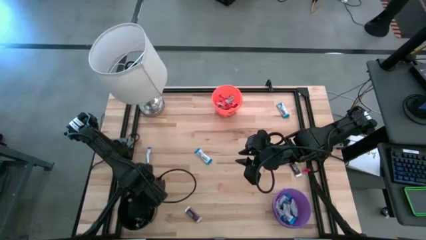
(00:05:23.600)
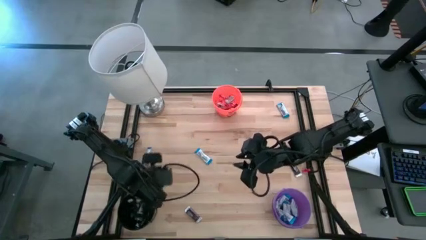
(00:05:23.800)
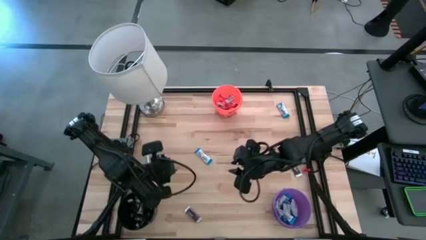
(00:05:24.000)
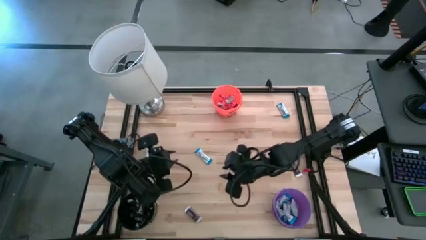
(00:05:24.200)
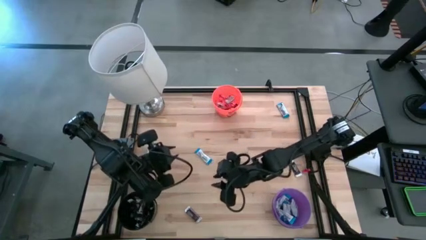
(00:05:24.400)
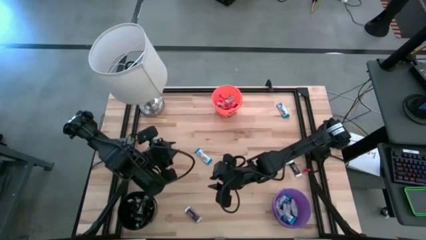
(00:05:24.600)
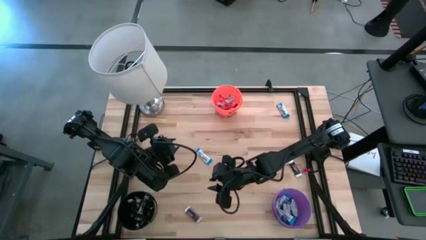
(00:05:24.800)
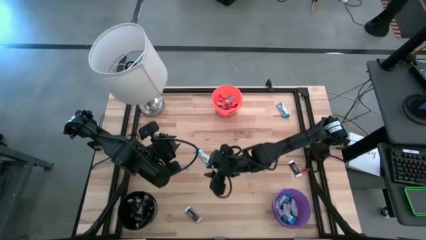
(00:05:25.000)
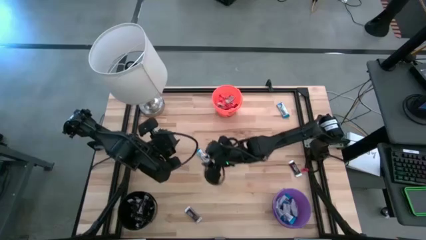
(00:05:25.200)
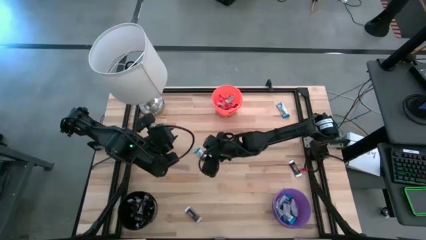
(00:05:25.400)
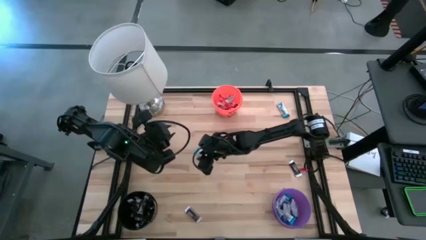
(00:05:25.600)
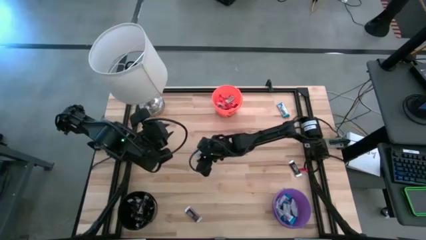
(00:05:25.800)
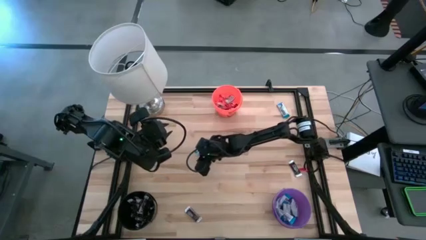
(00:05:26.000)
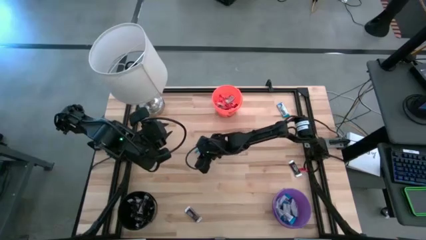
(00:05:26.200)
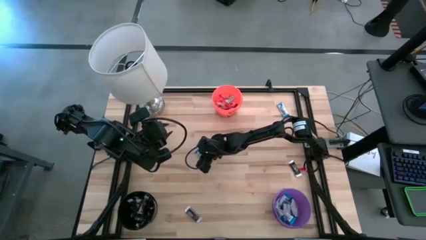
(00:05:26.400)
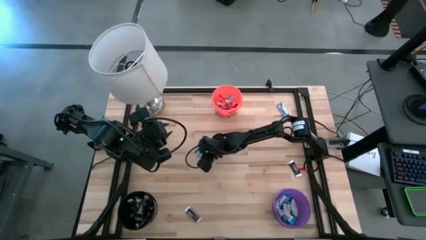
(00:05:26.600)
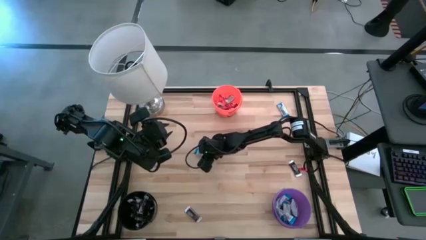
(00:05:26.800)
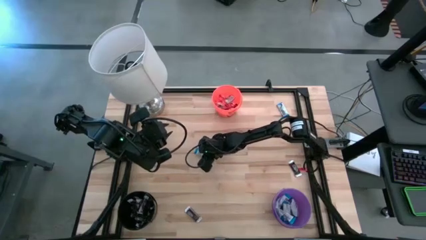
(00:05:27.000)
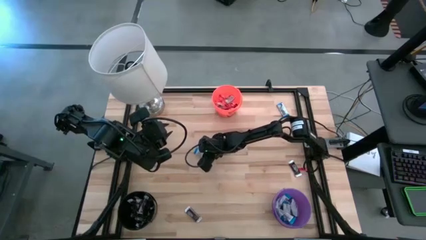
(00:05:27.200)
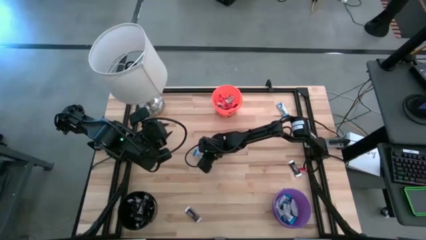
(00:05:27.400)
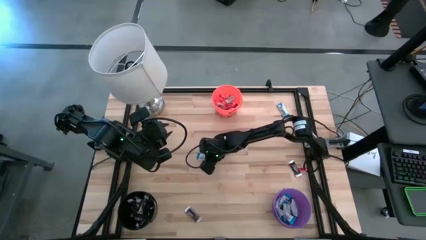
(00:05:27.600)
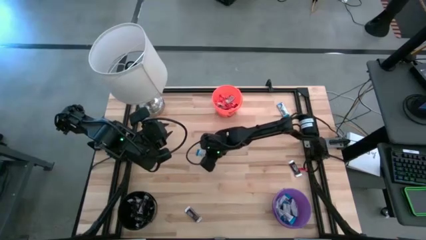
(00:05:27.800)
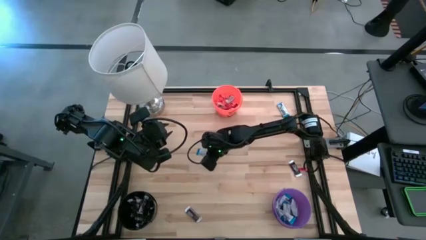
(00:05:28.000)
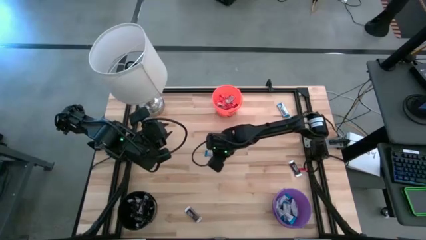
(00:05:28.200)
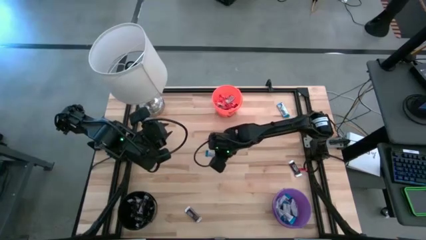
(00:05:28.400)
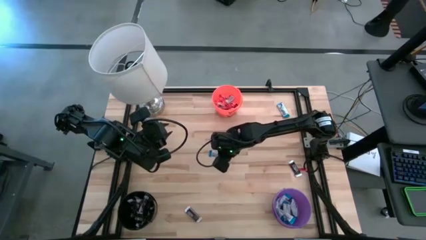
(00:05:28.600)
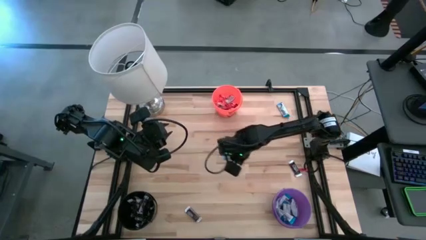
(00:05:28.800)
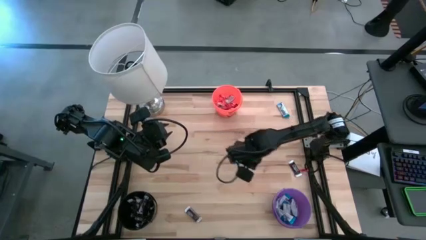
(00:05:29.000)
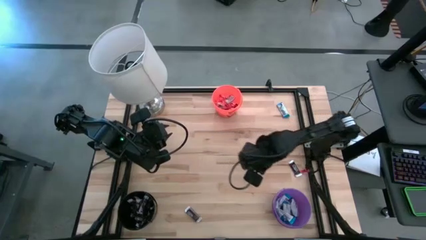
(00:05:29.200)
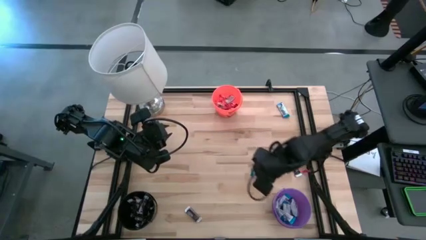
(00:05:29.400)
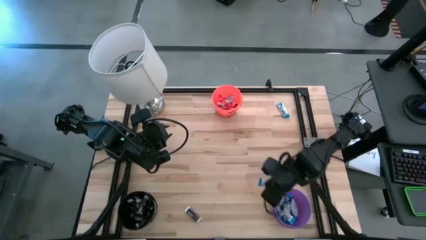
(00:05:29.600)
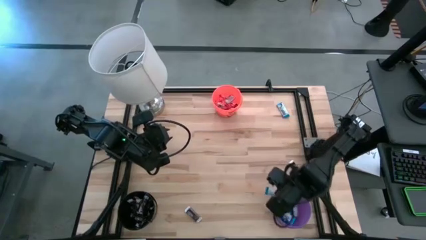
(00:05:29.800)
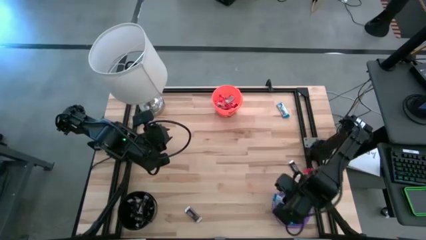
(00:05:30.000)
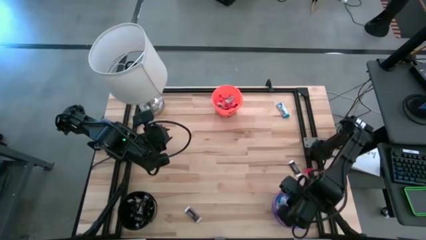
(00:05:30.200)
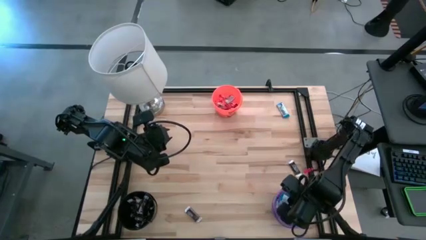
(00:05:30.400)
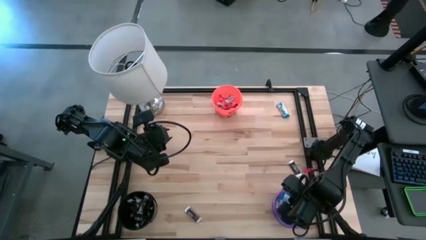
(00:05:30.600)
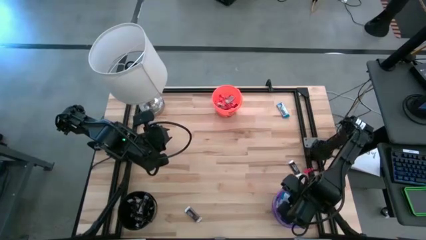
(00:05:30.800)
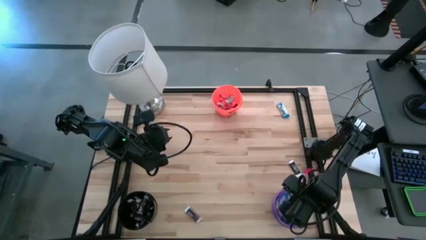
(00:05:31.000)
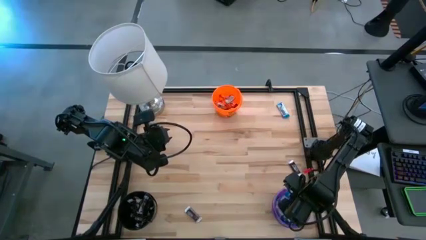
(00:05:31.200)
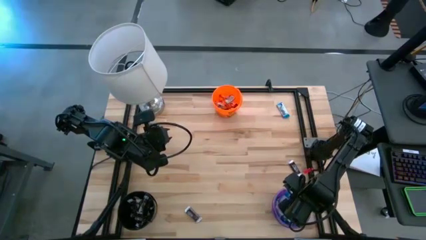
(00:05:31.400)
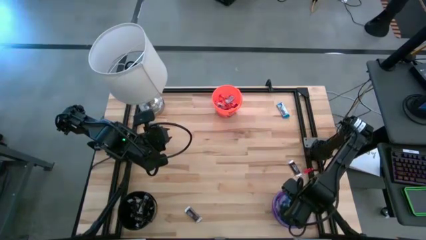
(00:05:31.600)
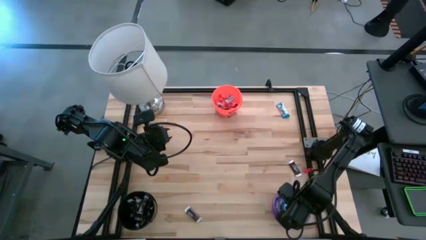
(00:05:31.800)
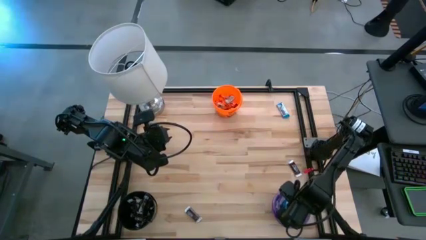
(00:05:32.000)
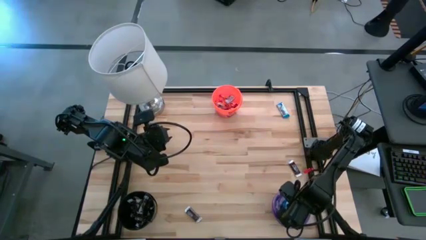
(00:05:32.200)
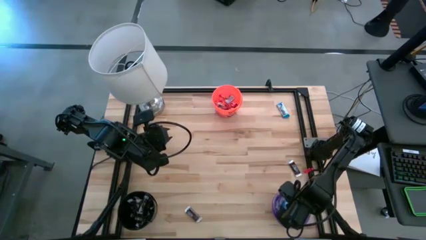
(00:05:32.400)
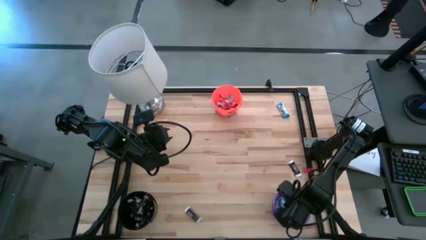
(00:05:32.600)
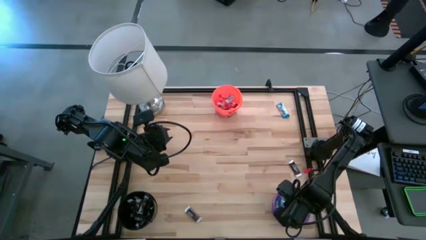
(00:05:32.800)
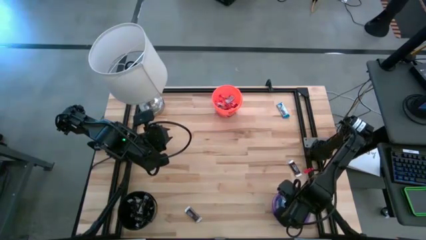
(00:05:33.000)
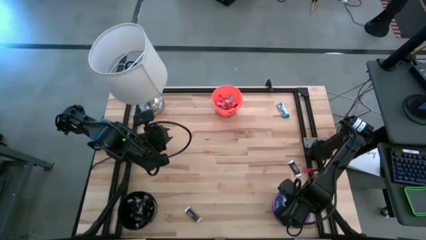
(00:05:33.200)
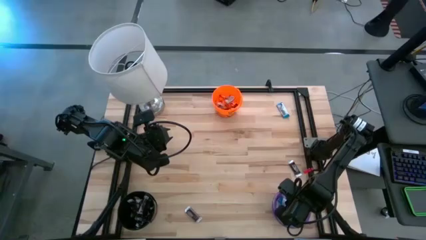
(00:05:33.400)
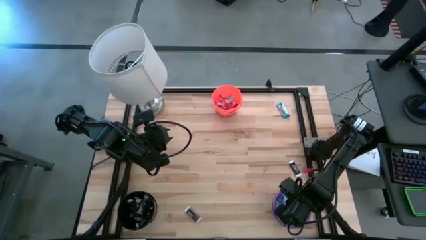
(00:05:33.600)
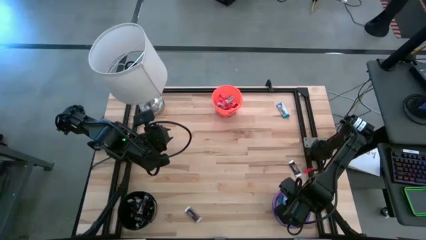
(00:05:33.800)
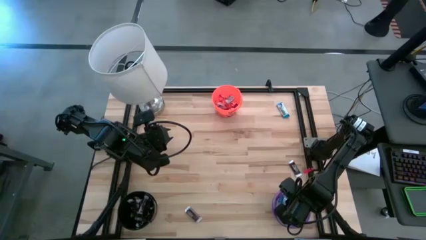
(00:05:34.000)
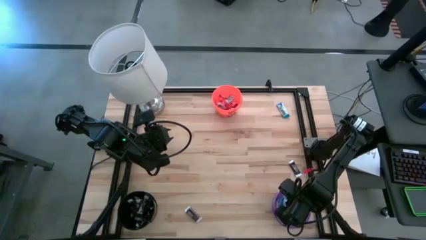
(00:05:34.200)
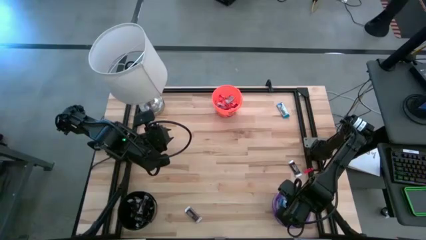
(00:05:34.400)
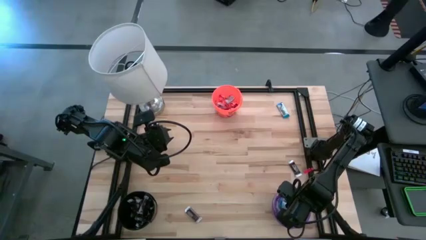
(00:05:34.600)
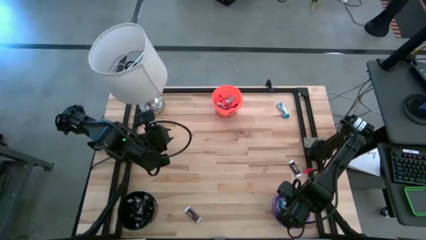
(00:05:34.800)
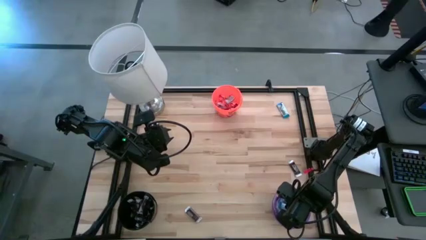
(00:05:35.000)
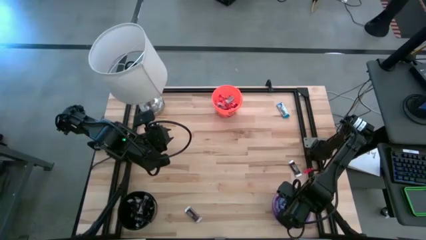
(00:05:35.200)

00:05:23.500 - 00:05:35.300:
Task: Organize candy in baskets
Put the white chocolate into the purple bucket
